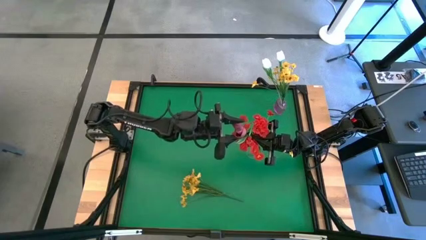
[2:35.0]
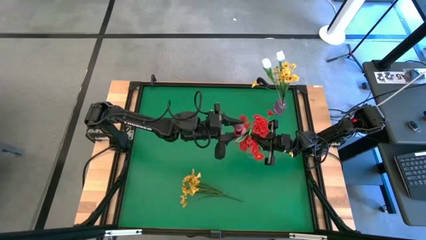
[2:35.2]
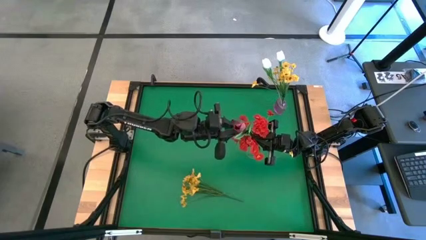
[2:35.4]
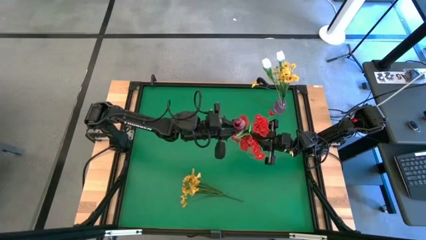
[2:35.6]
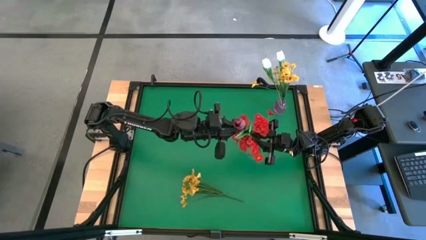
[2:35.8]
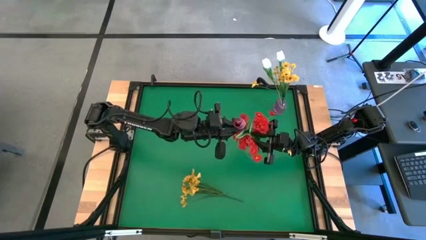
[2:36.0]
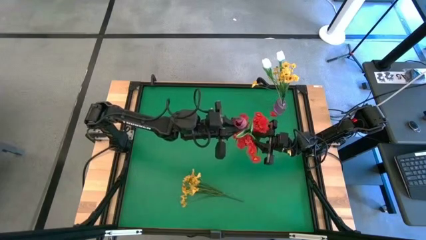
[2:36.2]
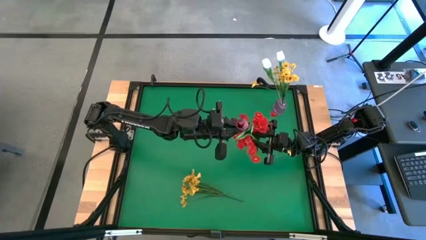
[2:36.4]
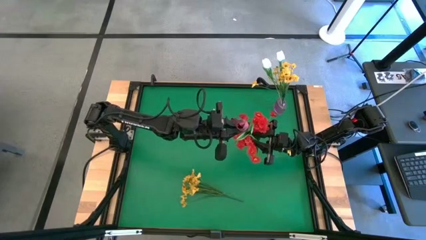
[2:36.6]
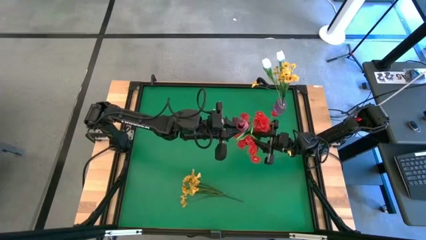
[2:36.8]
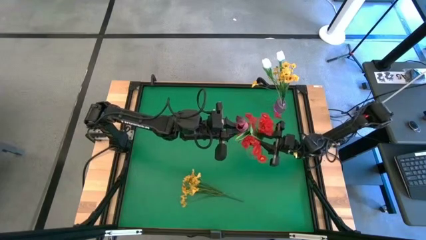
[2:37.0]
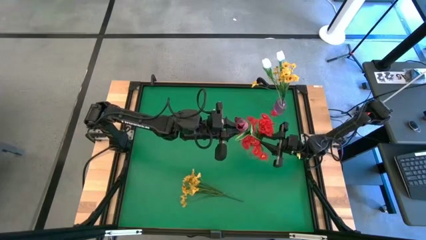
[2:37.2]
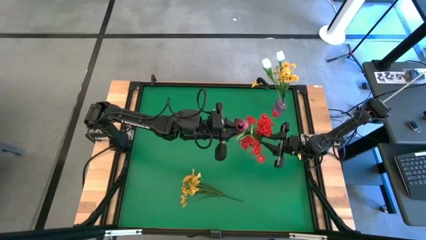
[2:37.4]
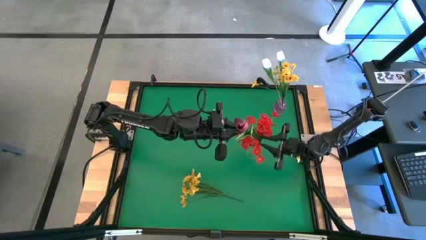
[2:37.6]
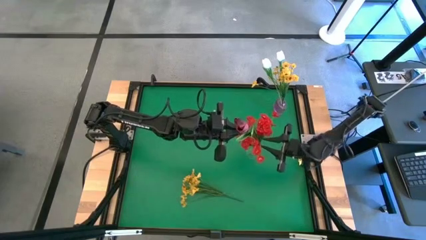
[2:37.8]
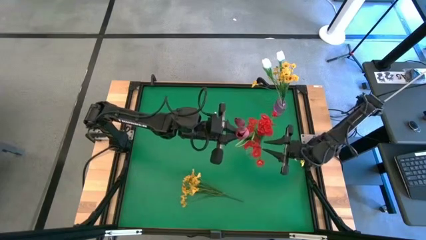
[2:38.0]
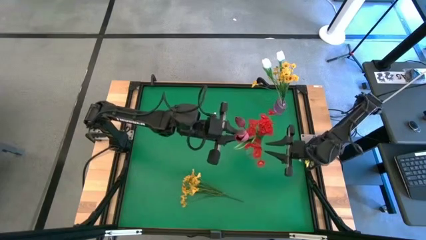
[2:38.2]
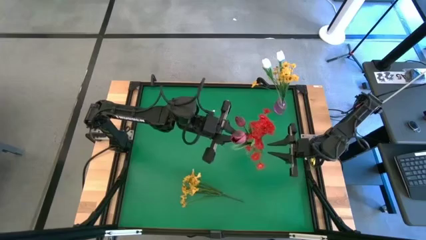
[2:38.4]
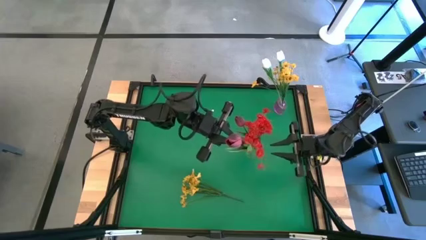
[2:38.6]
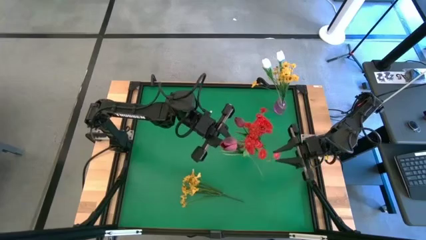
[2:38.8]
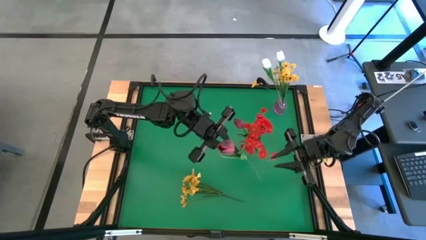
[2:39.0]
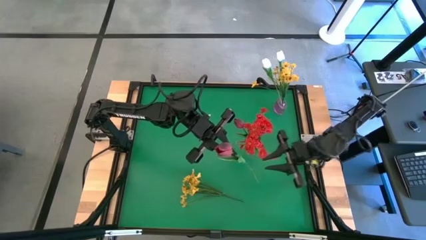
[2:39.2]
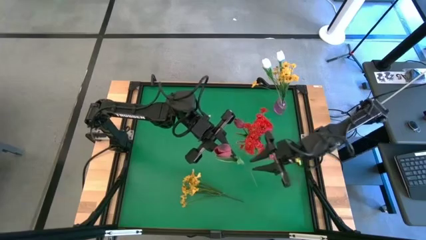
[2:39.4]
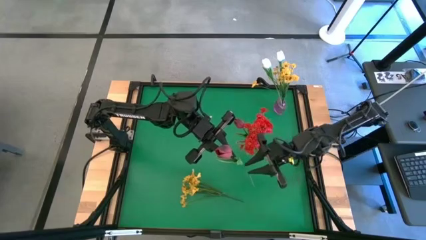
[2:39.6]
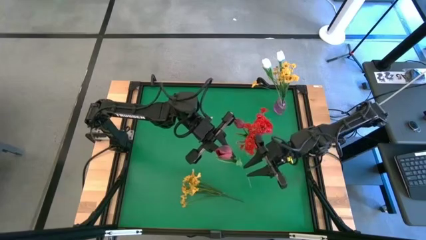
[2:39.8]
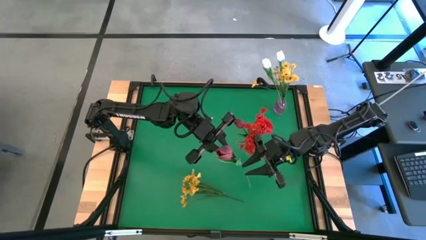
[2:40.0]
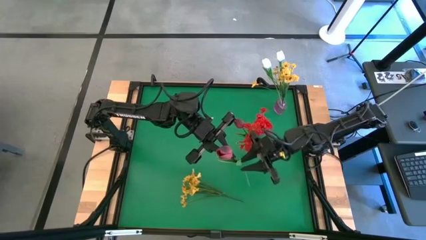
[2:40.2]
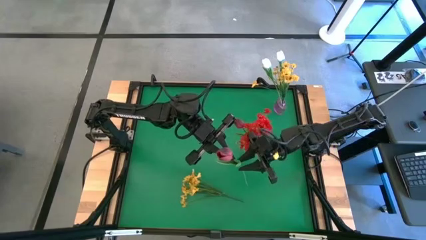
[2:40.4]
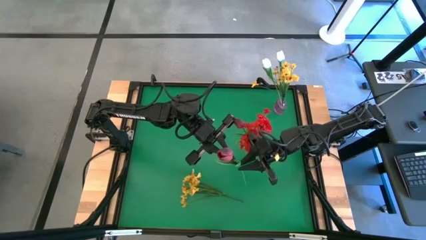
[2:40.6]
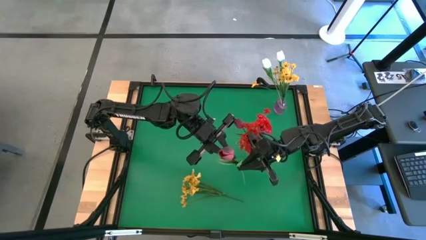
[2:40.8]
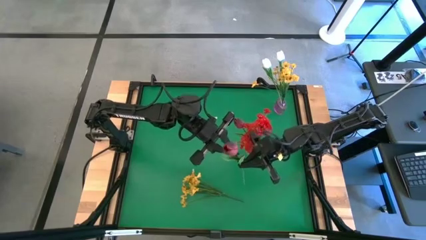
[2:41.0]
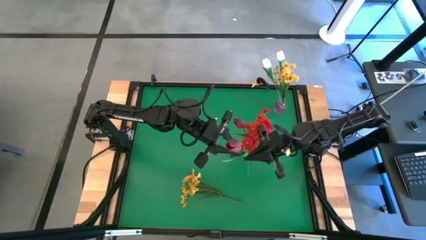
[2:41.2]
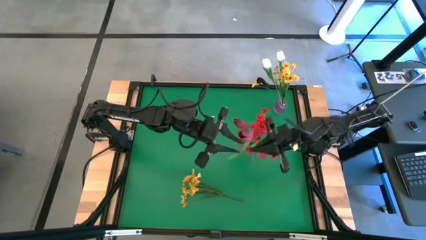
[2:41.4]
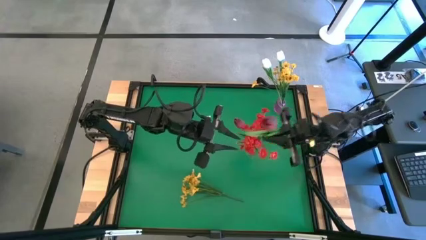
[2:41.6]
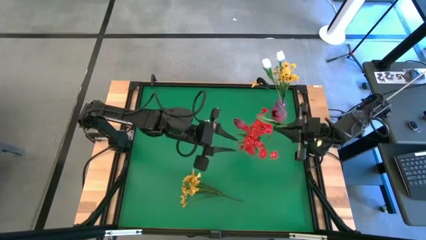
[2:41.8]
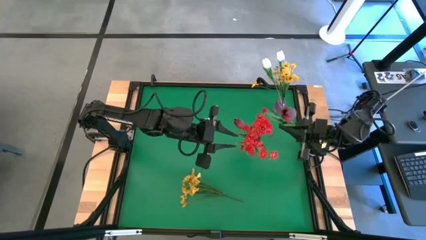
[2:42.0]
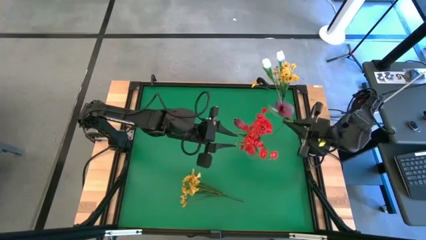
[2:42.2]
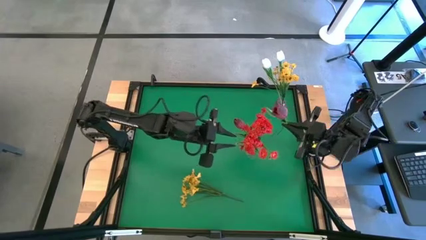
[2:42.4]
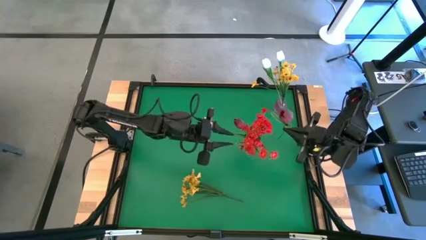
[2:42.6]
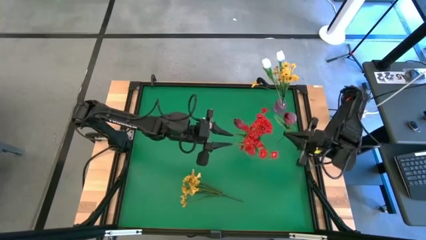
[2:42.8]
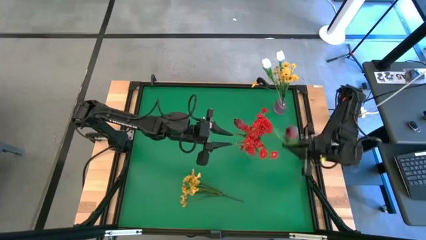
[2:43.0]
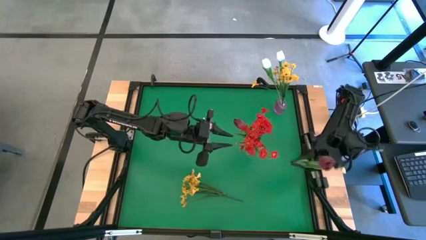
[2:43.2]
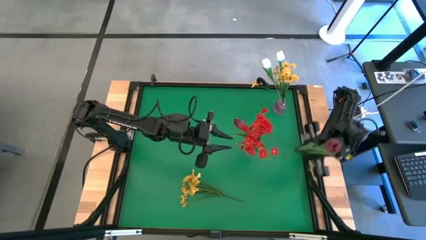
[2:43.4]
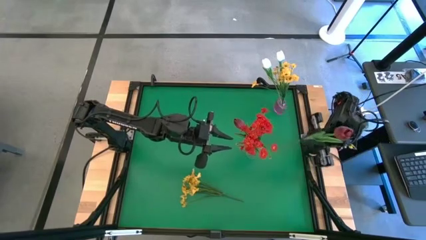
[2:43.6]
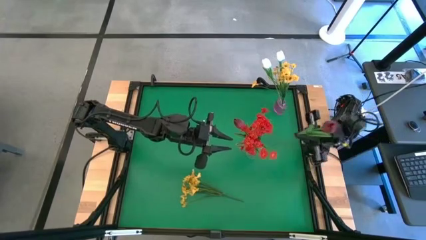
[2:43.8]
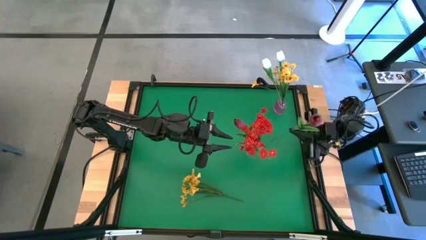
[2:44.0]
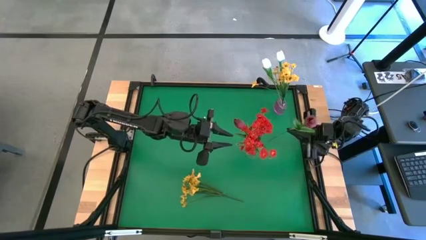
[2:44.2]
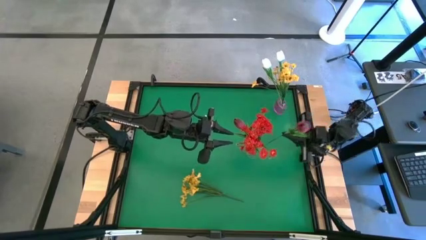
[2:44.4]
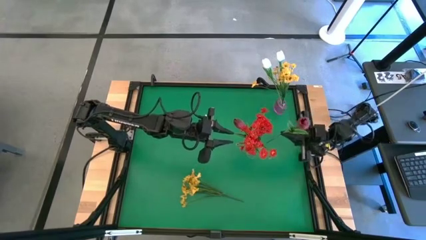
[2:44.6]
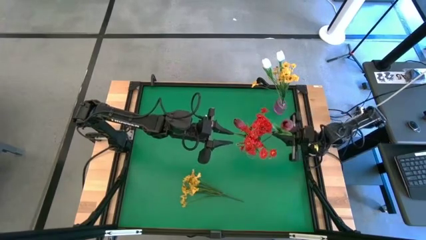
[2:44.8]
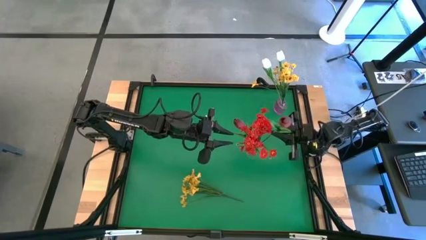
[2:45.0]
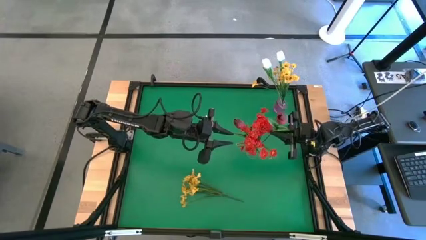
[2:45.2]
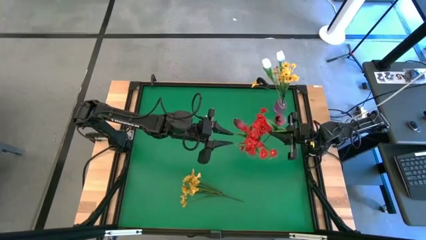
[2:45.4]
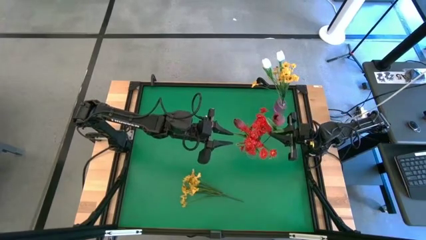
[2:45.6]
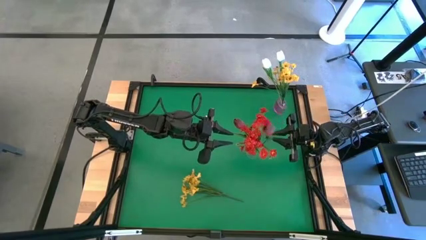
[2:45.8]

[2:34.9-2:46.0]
Task: Sort flowers into vase by color
Put the red tulip into the transparent vase

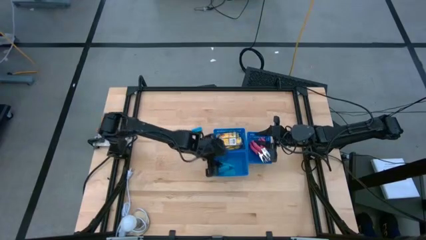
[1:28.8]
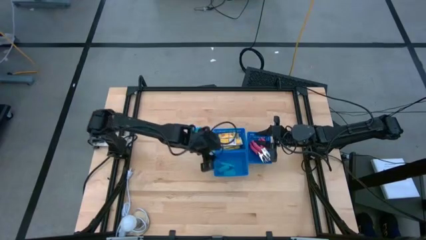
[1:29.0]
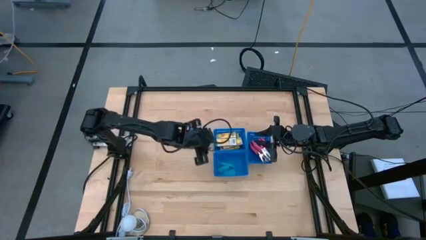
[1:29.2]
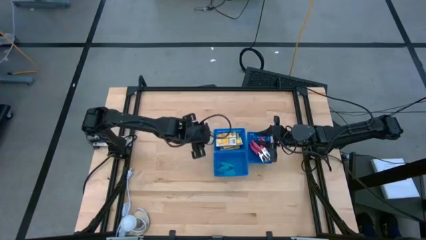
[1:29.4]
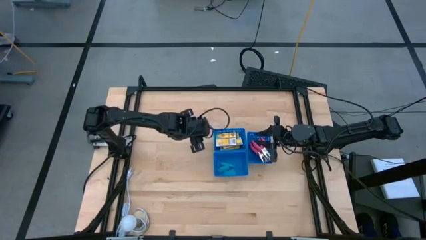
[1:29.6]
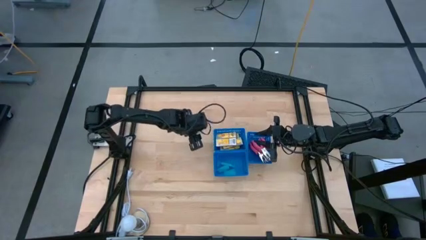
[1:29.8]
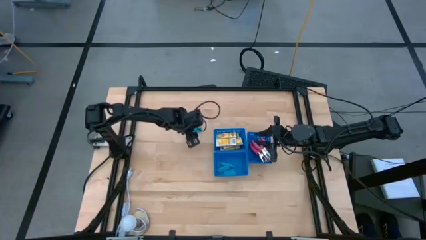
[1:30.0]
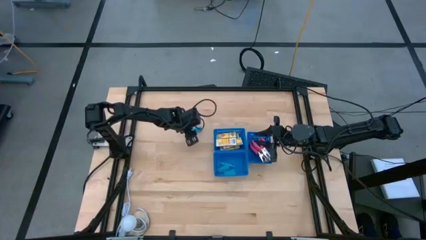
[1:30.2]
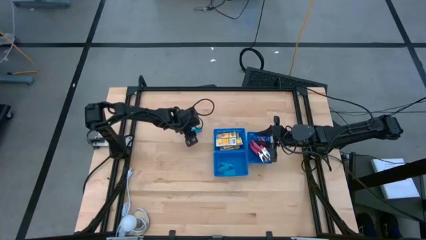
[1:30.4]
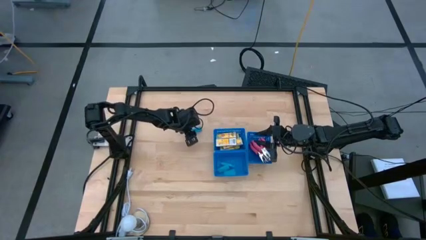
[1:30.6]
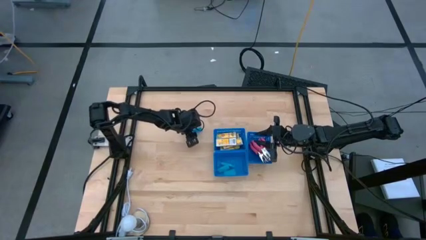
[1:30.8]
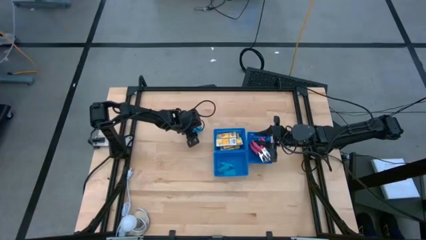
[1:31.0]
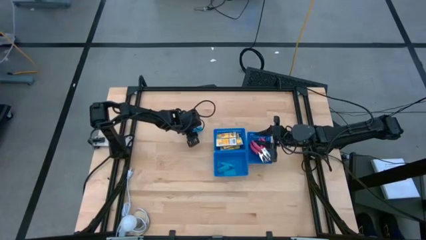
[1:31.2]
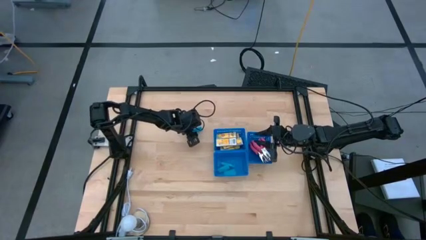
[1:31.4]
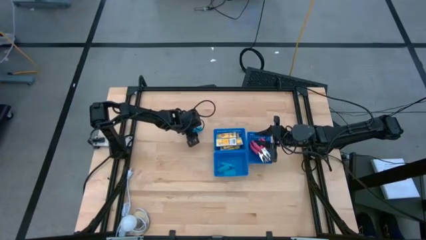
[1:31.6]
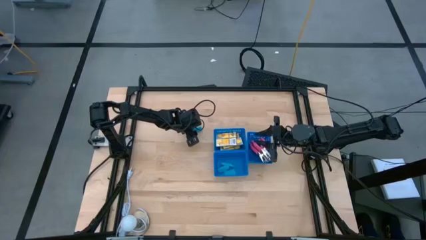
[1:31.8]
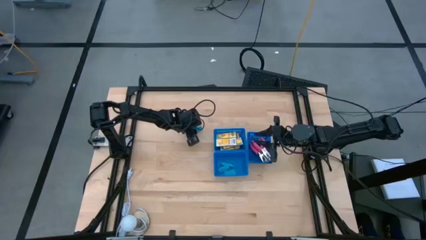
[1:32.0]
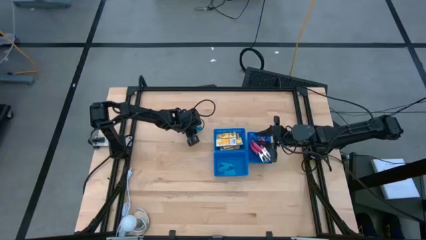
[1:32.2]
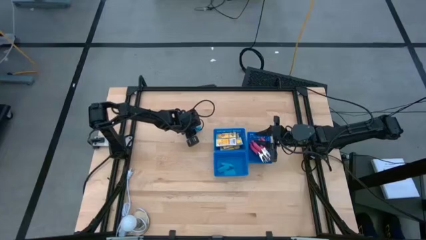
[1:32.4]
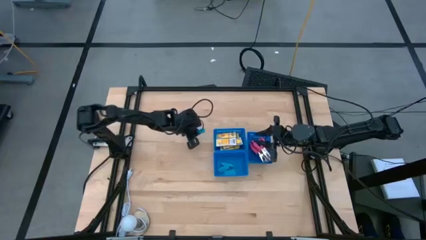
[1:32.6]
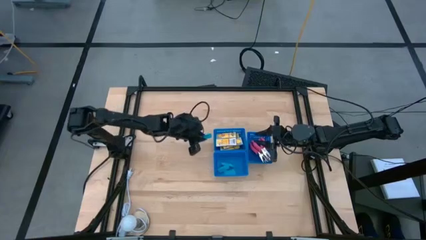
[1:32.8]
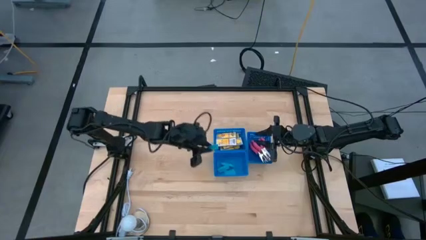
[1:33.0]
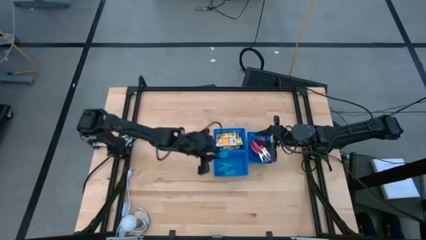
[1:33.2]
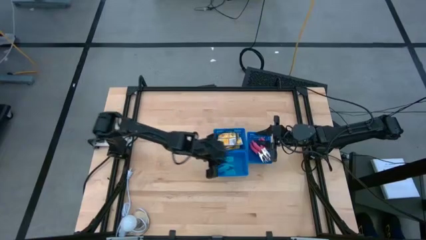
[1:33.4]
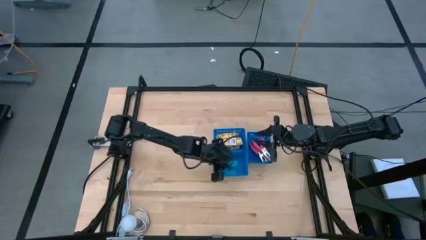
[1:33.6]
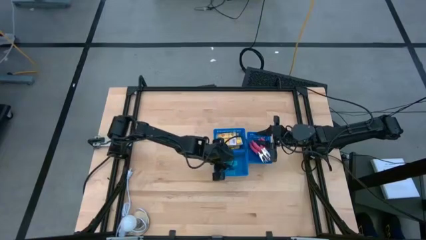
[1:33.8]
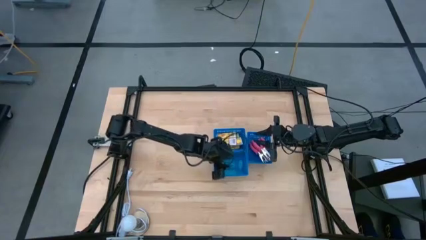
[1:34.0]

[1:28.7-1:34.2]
Task: Pick & Place School Supplies
Put the blue eraser into the bottom horizontal blue bin
